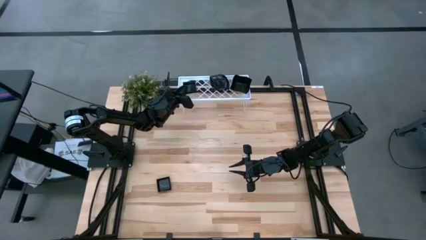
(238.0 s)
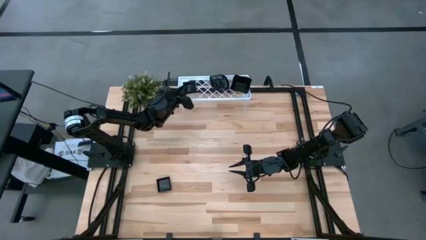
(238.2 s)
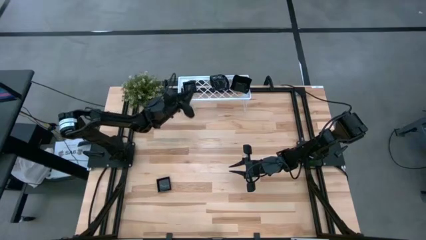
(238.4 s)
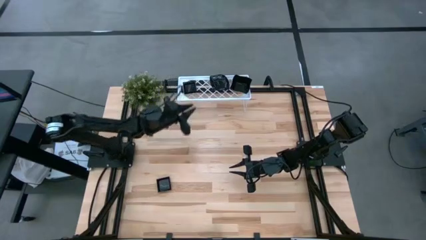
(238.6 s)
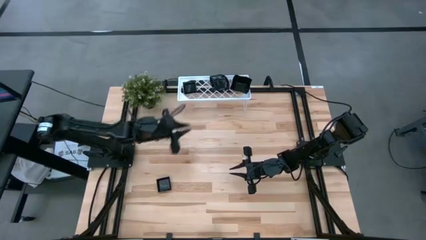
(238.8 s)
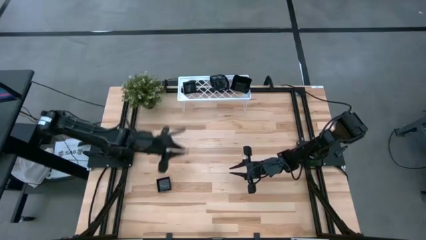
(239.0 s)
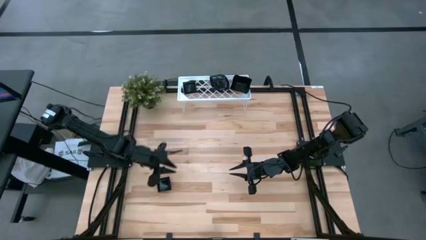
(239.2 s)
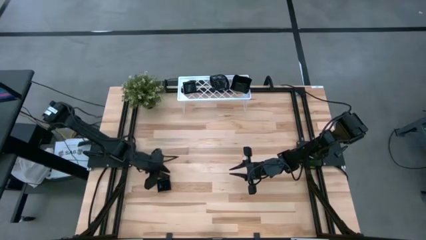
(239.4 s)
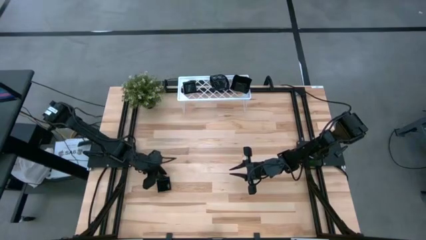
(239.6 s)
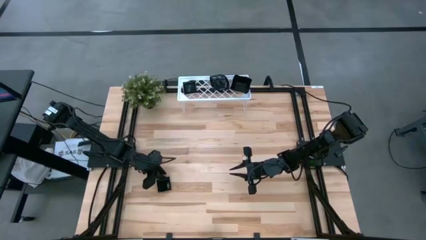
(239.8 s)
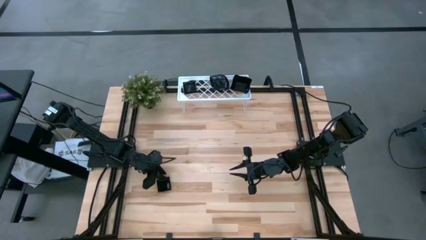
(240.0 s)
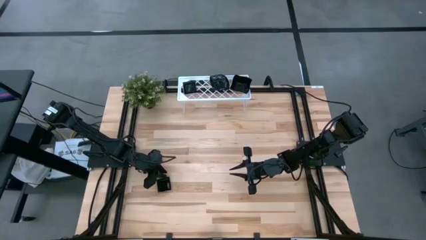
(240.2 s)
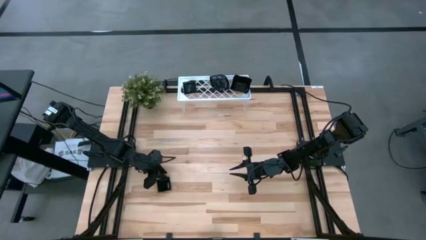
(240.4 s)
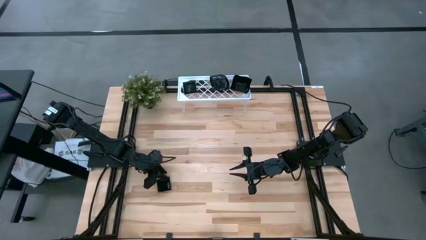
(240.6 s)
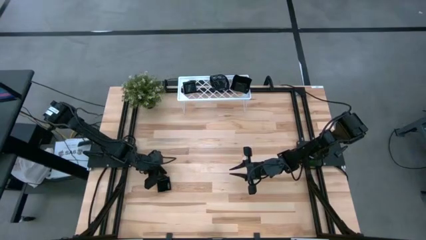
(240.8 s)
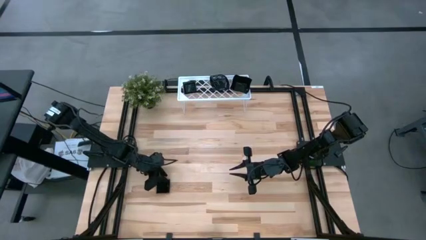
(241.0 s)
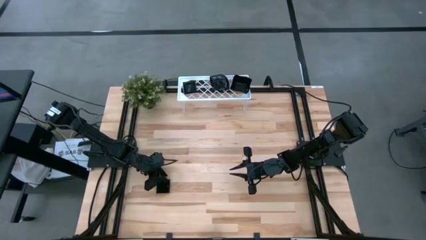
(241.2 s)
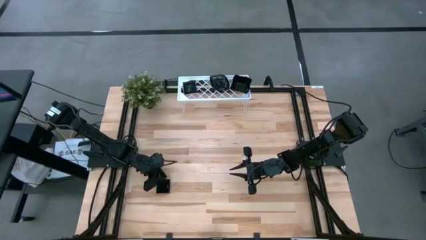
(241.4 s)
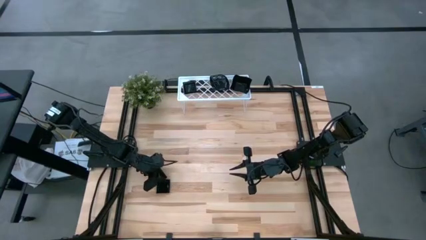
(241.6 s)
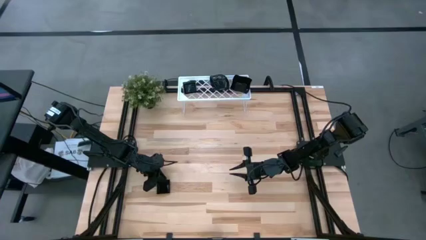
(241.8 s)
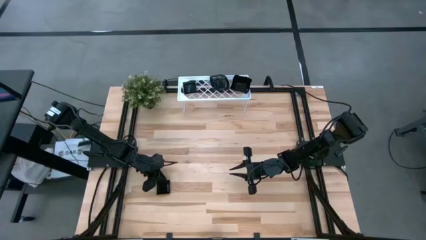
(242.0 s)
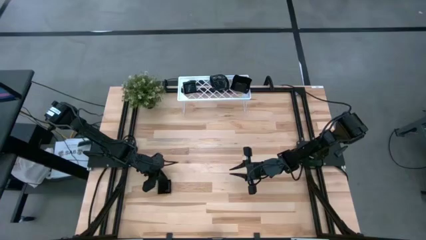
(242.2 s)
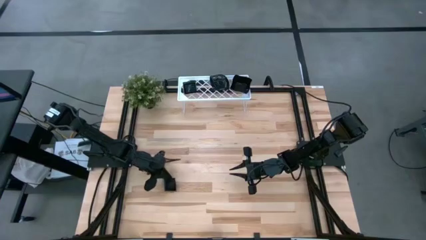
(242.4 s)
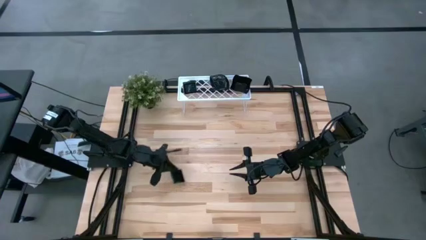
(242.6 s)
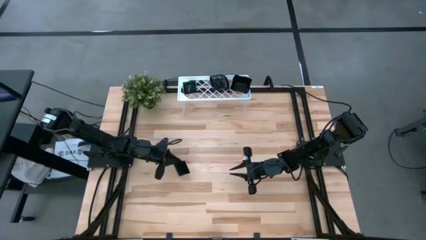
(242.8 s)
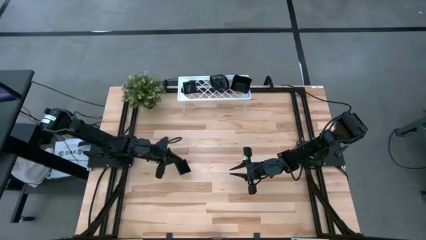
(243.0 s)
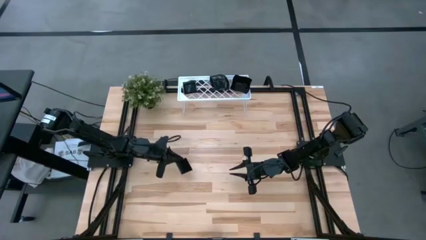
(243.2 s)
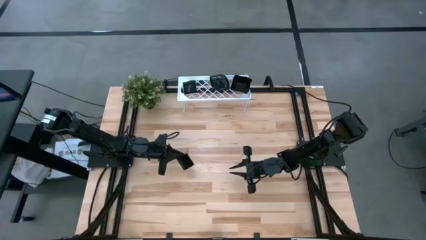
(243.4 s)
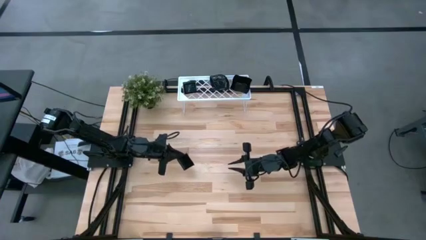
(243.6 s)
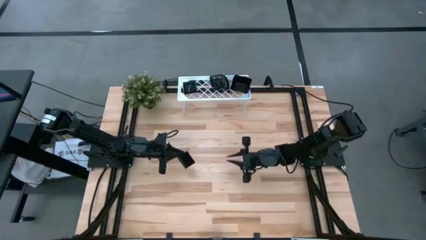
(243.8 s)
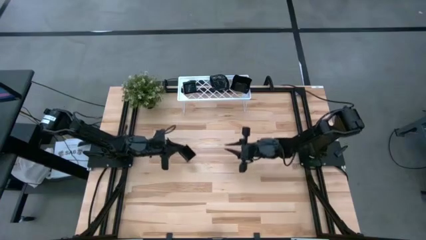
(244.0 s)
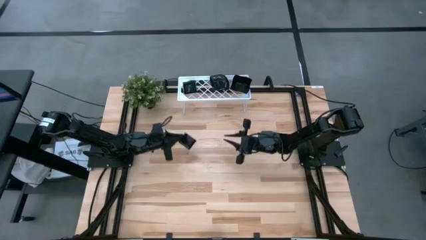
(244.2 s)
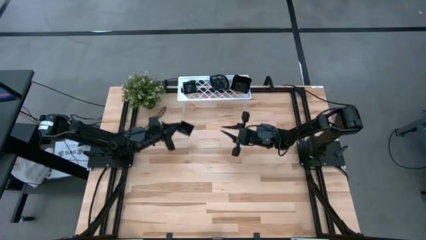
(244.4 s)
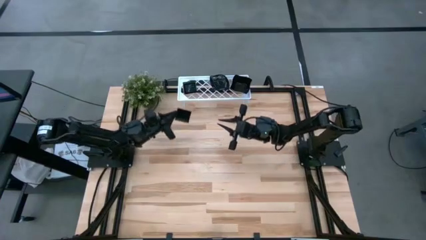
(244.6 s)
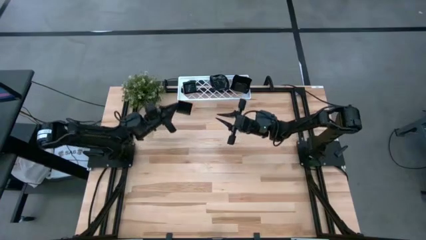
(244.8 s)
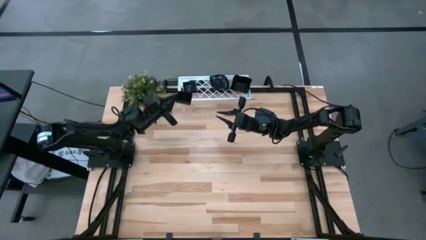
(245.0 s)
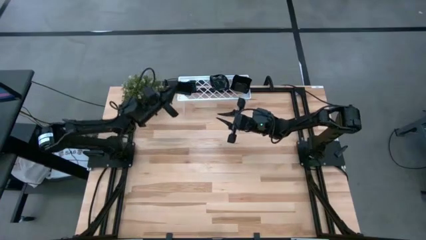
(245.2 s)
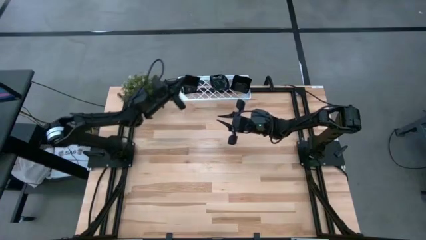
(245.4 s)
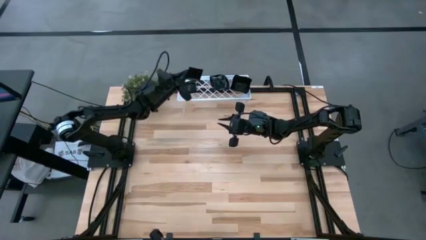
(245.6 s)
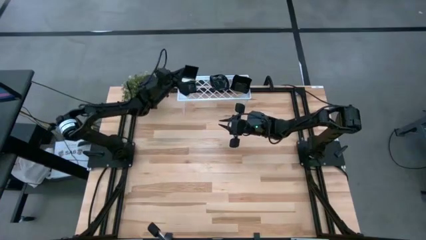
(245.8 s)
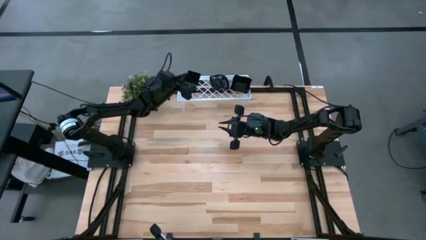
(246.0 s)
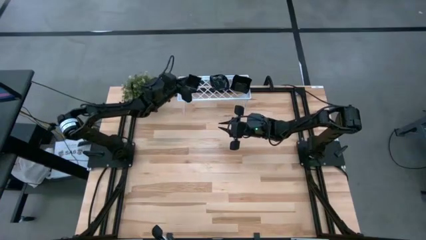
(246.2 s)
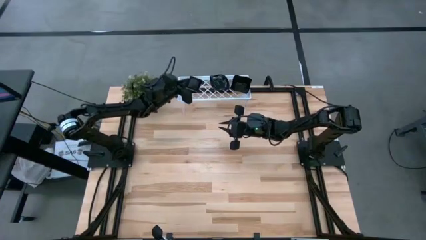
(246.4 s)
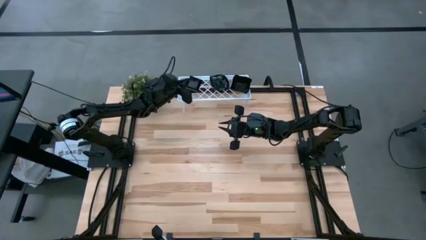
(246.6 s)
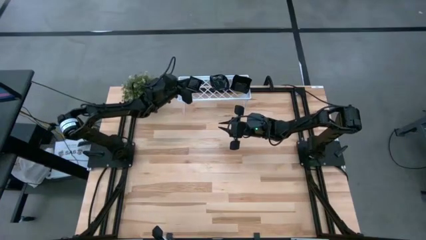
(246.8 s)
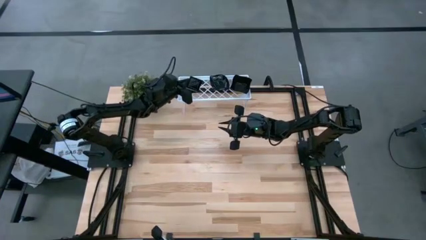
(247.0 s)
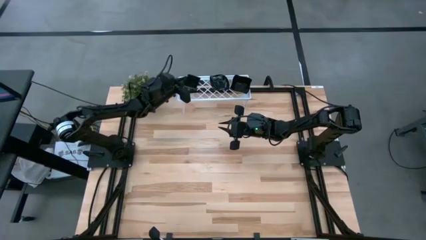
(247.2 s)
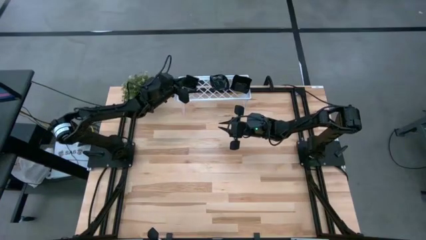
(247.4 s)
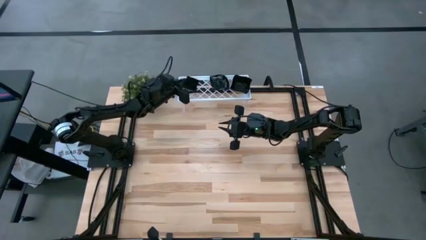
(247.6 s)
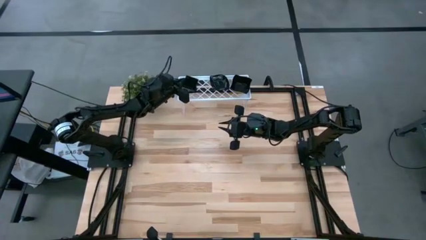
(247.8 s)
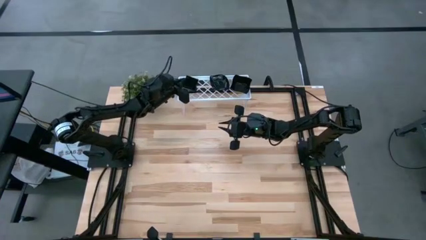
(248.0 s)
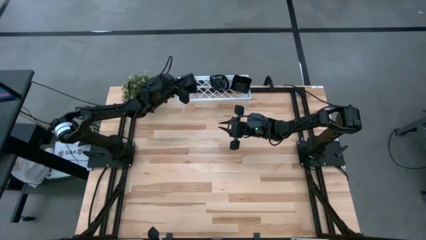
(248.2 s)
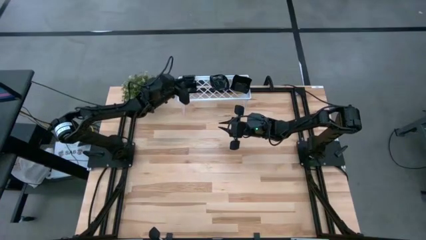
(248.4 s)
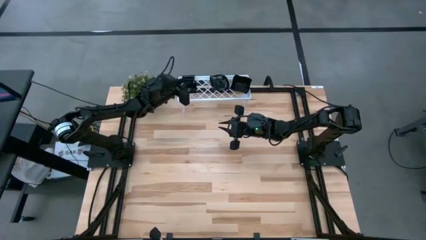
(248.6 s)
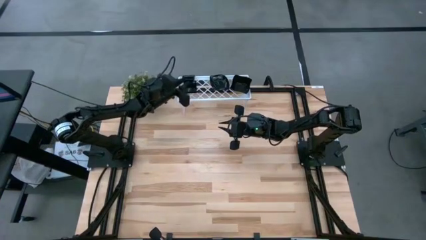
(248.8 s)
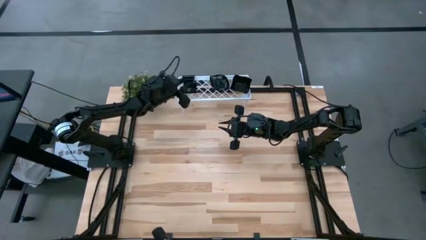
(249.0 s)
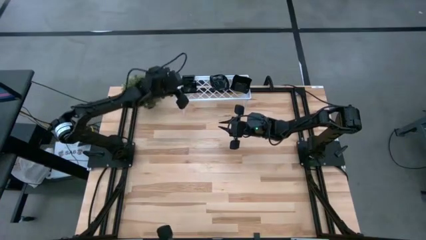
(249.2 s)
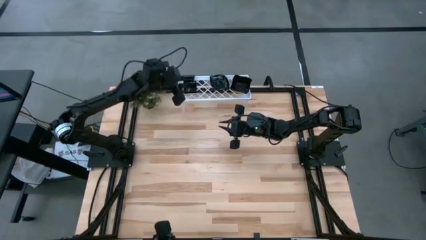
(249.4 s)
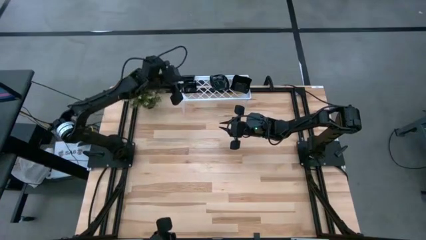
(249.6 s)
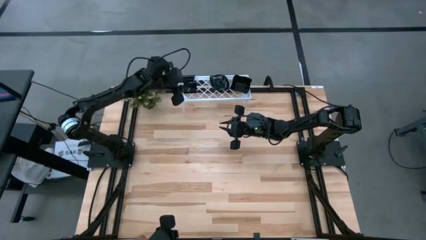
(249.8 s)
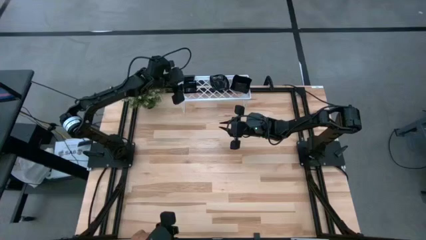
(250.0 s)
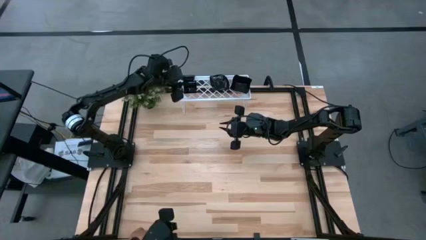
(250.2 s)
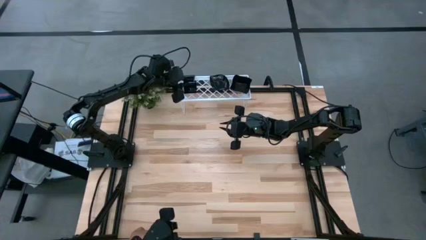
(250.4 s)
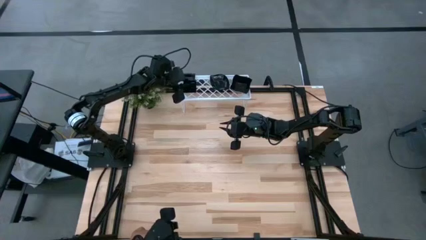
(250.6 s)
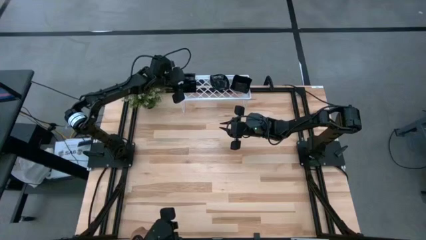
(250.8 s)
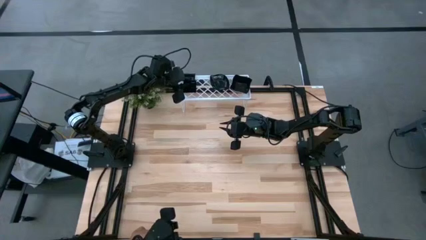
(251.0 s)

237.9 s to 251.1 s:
Task: Pick & Place Mini shaped plates
Stack the black square plate on top of the black square plate on the shelf

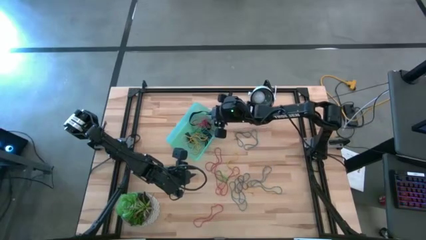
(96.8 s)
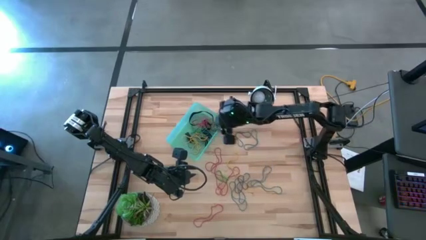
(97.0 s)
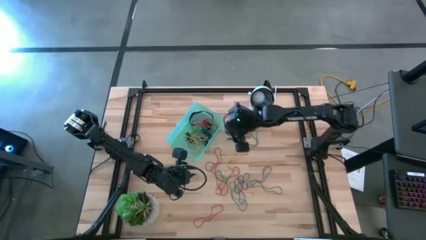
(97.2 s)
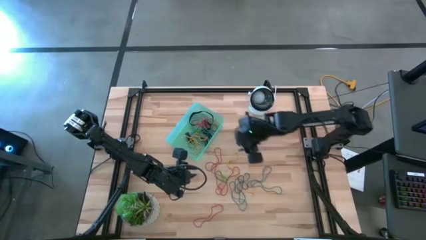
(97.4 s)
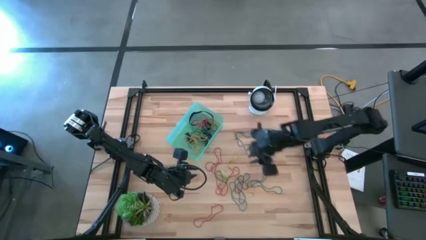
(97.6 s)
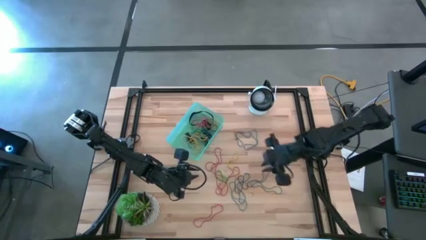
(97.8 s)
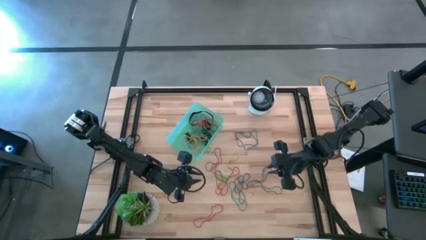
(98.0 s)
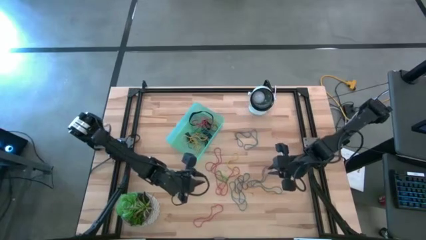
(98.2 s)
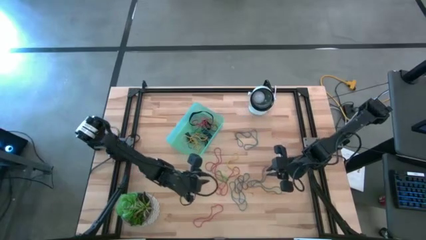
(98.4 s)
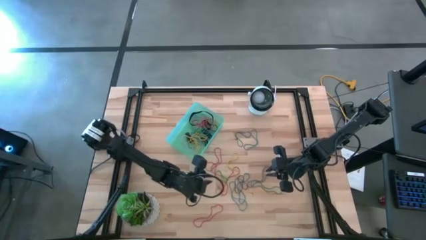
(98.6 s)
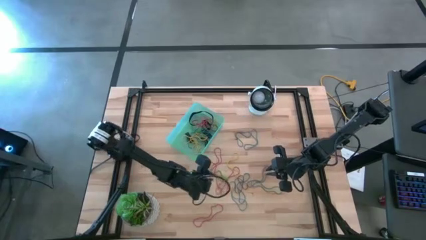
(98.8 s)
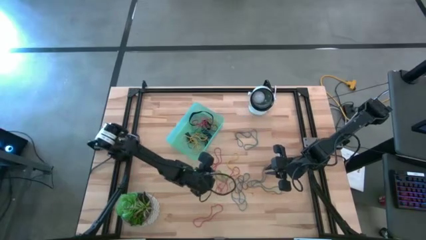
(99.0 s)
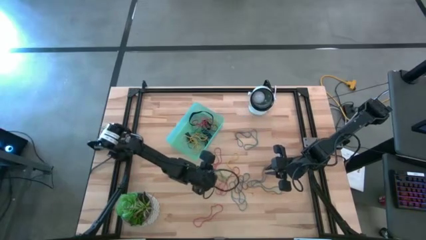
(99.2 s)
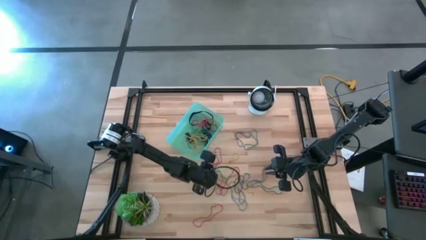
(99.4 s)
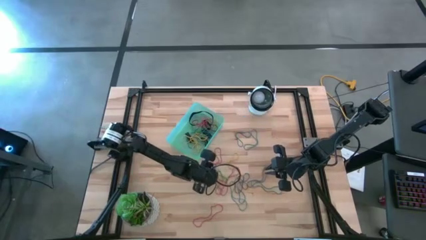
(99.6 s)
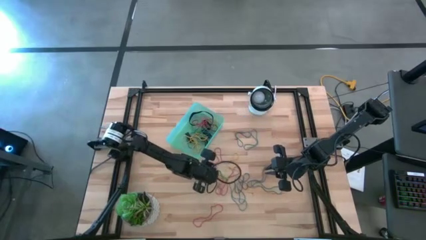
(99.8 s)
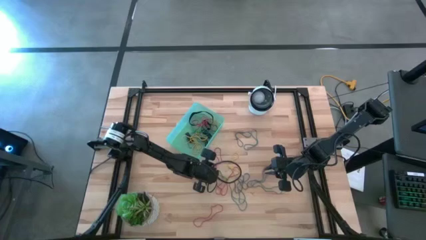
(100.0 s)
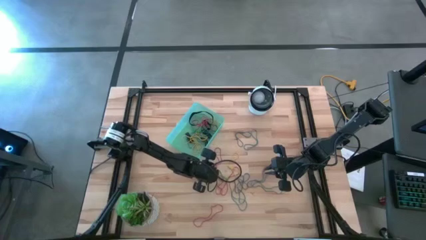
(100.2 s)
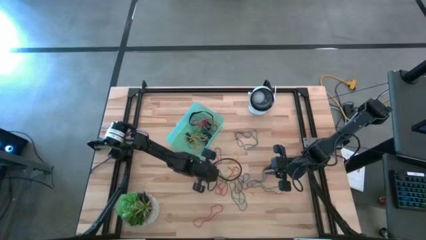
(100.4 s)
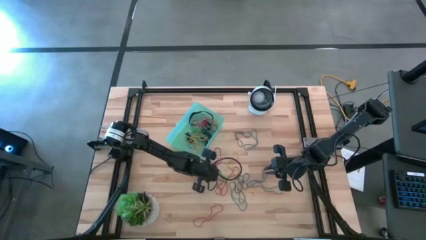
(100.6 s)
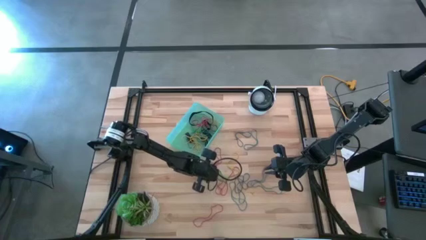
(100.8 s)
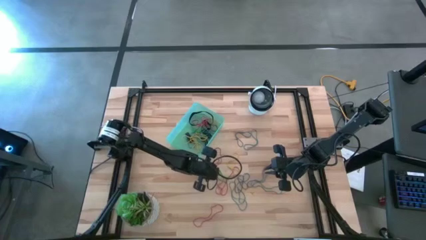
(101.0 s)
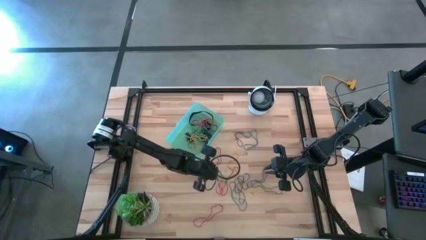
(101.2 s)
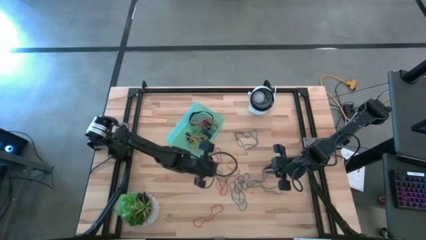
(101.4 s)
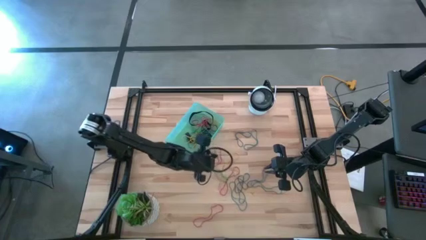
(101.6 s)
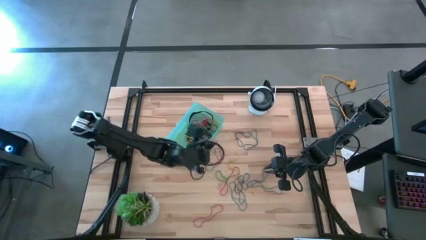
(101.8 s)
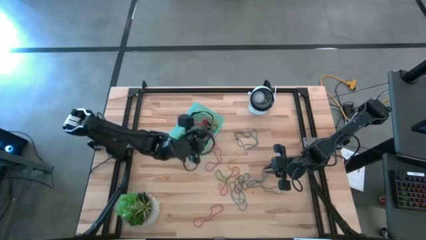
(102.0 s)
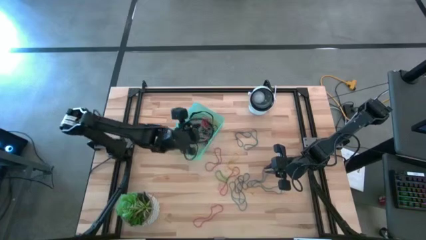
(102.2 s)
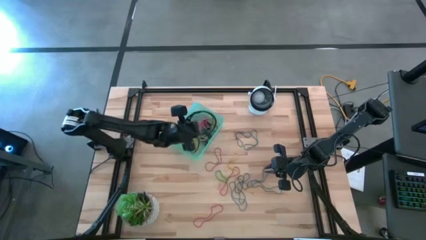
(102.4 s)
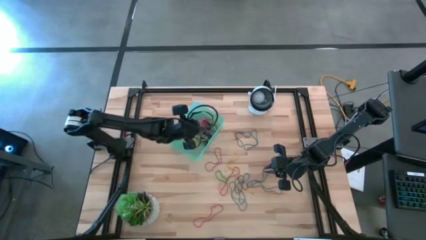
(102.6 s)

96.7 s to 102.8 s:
Task: Pick and place rubber bands into bin
Put the red rubber band into the green bin
